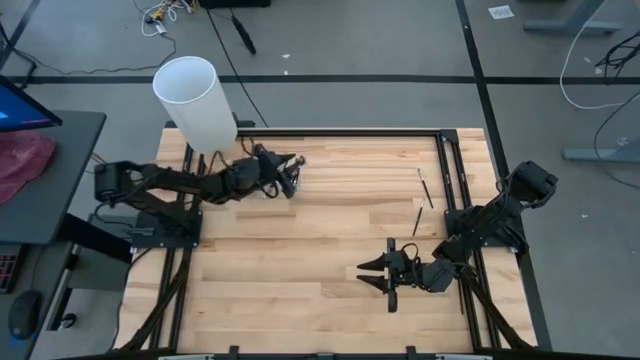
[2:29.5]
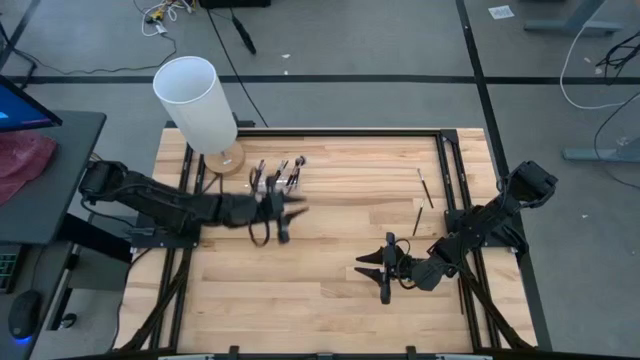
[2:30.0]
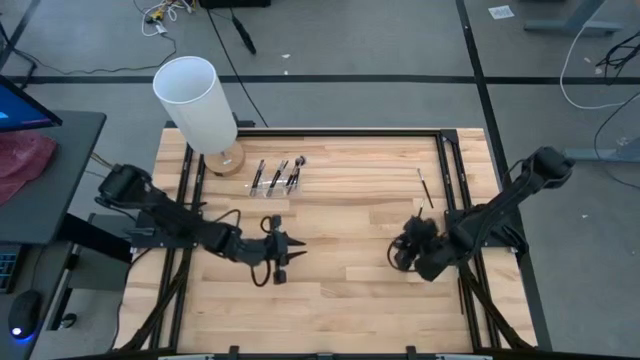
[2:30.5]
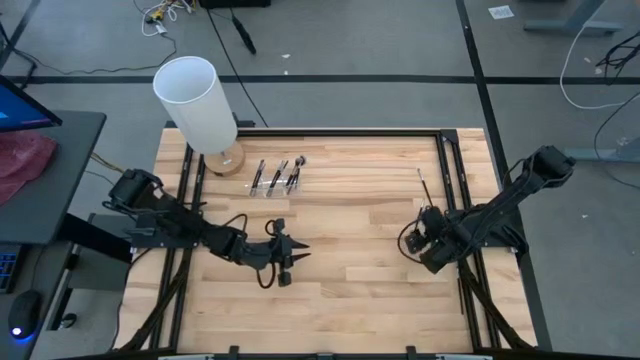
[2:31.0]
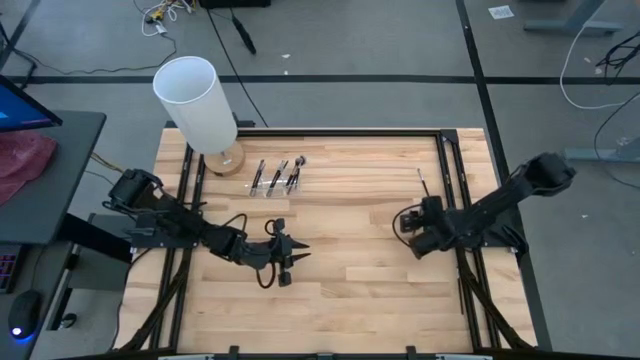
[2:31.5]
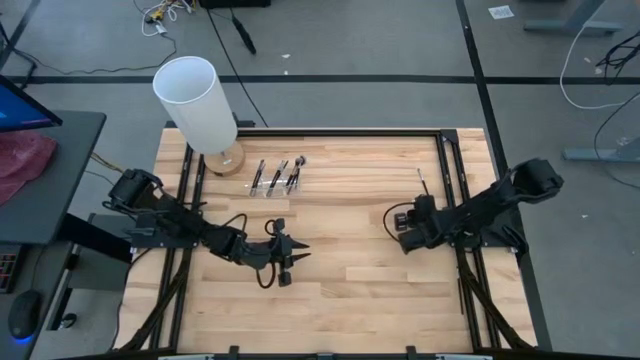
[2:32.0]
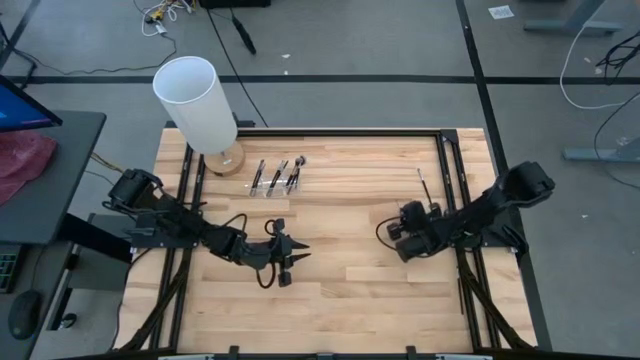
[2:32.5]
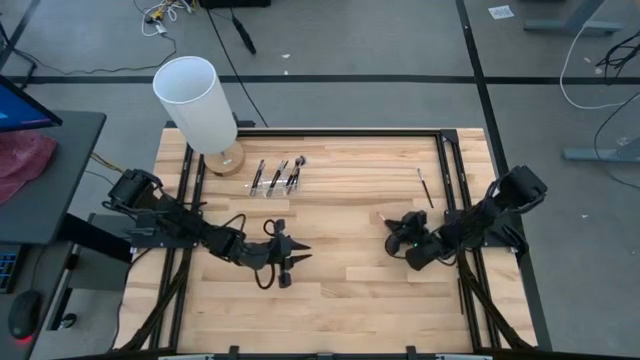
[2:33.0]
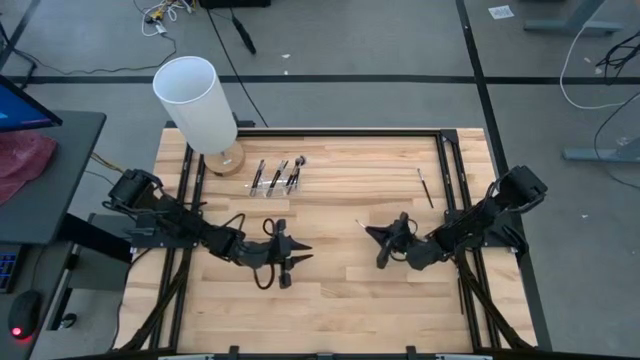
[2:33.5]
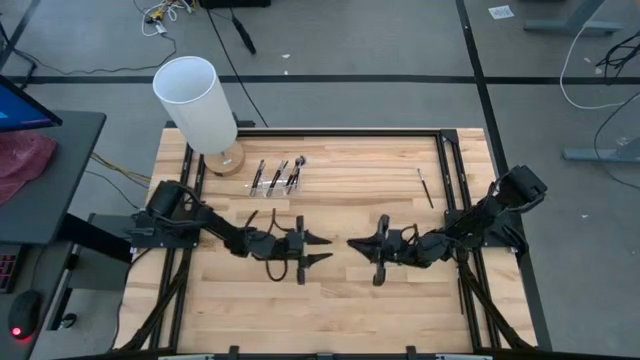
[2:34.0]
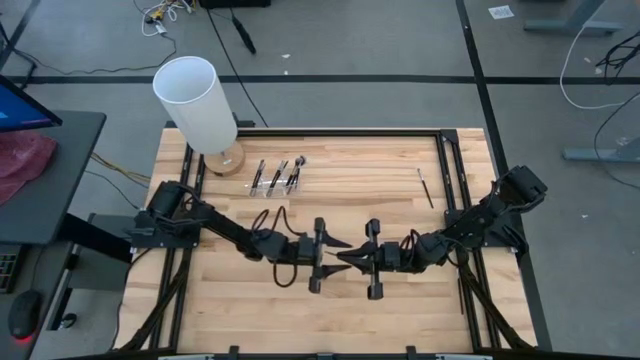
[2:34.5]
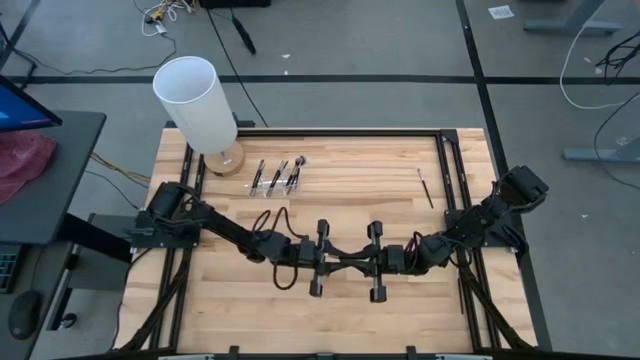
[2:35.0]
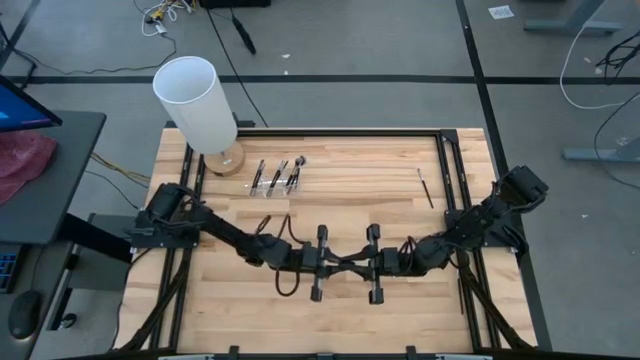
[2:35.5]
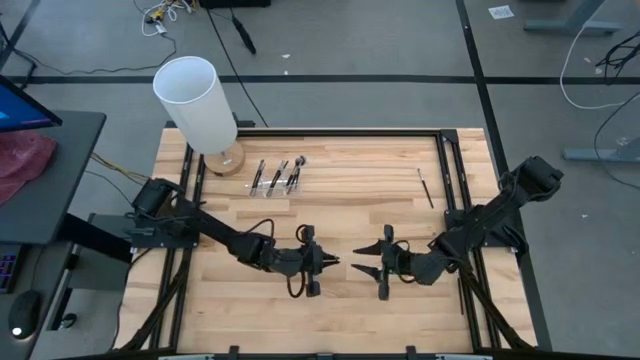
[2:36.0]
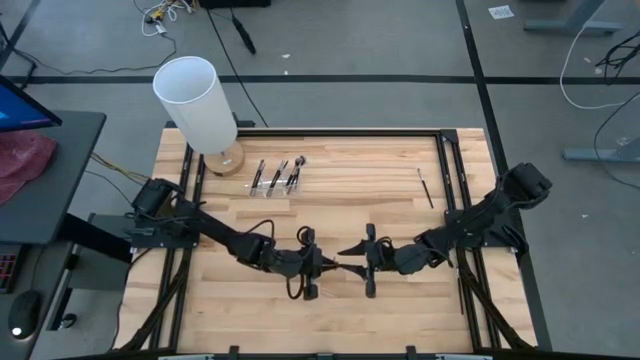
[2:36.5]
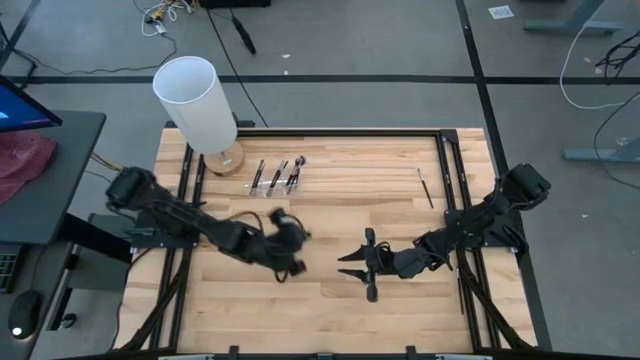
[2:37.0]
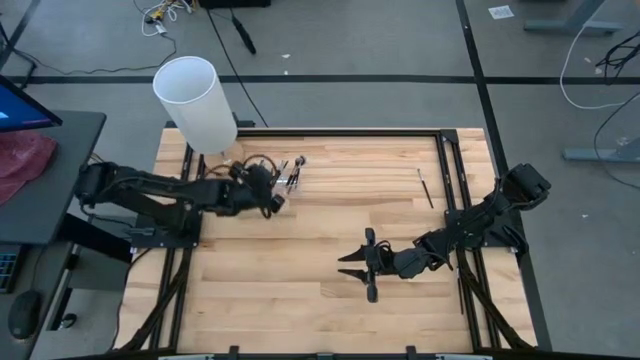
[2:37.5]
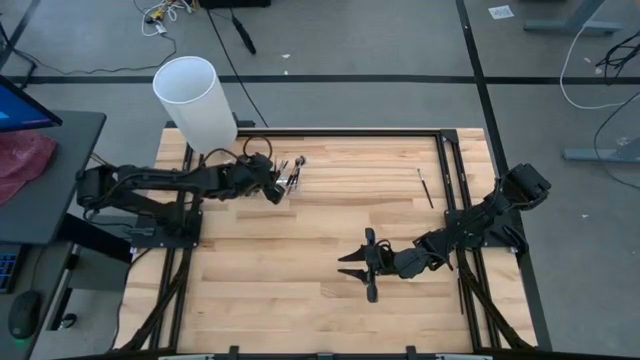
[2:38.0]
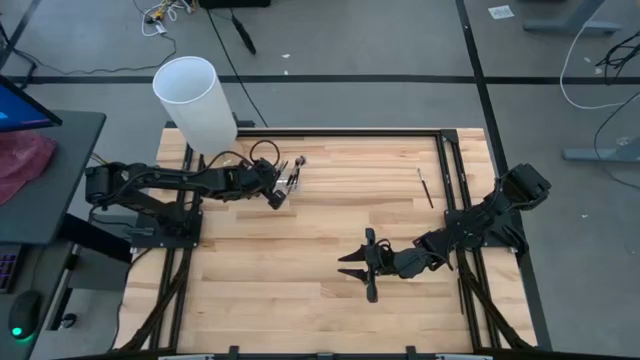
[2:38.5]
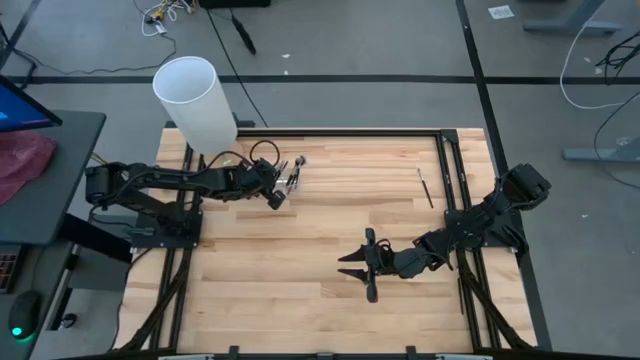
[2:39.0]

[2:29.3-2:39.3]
Task: Put items in baskets/containers
Put the eyeshadow brush into the transparent organizer

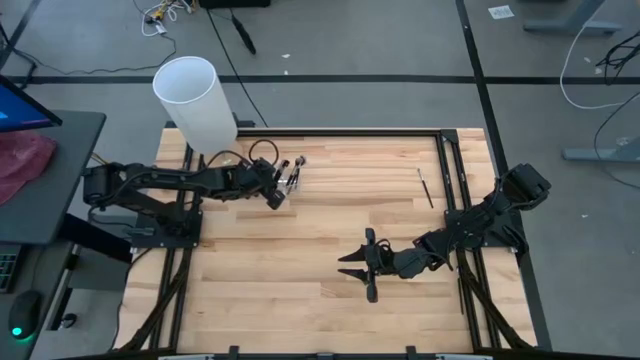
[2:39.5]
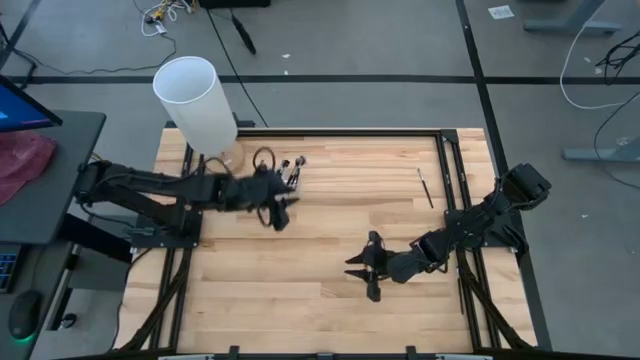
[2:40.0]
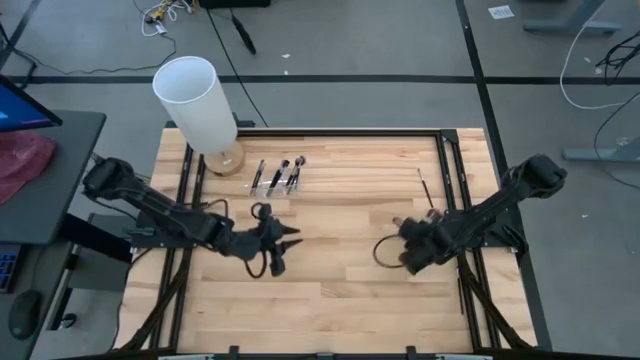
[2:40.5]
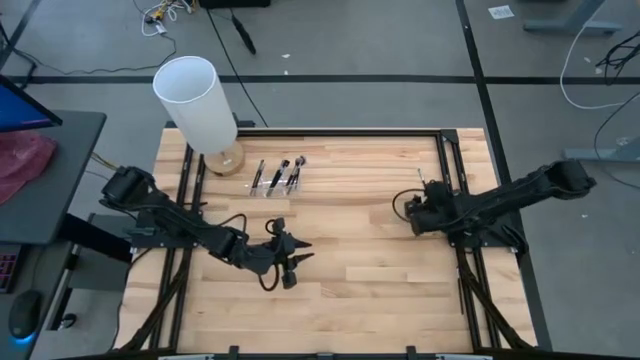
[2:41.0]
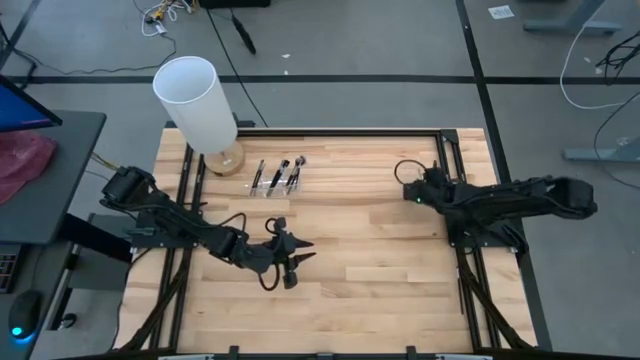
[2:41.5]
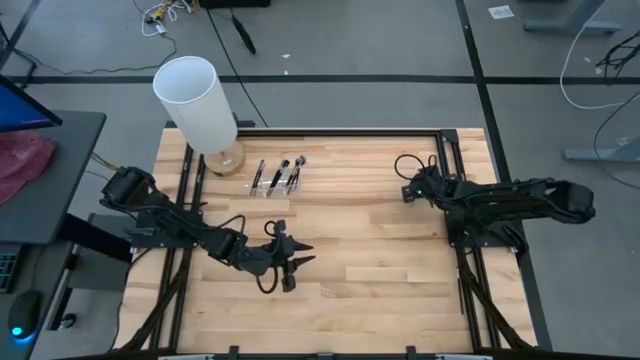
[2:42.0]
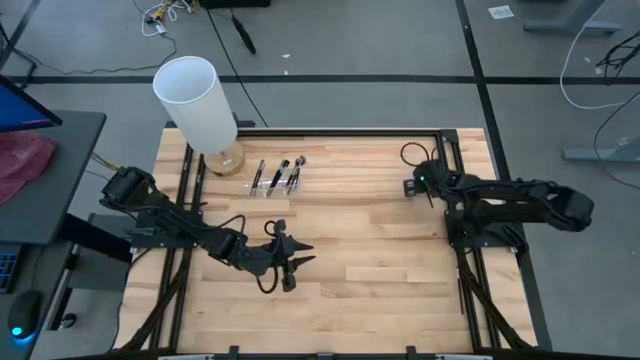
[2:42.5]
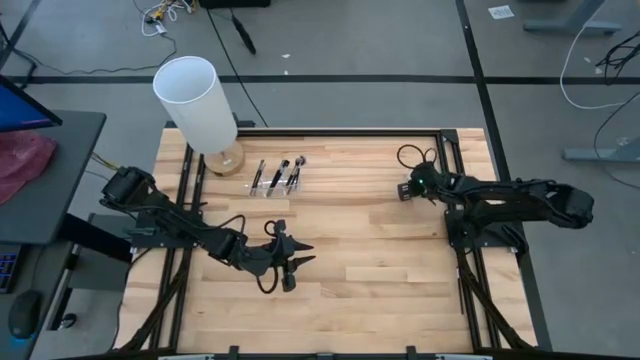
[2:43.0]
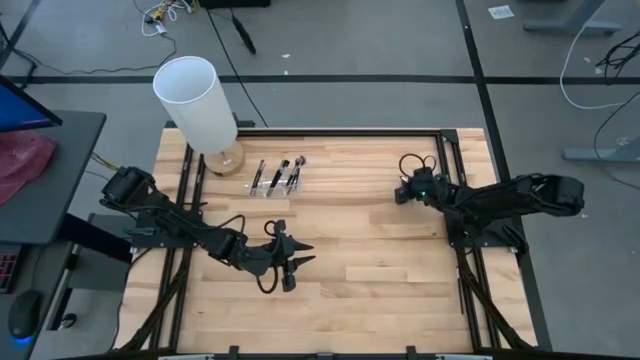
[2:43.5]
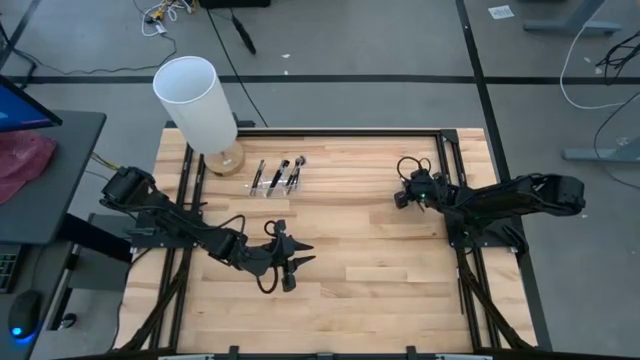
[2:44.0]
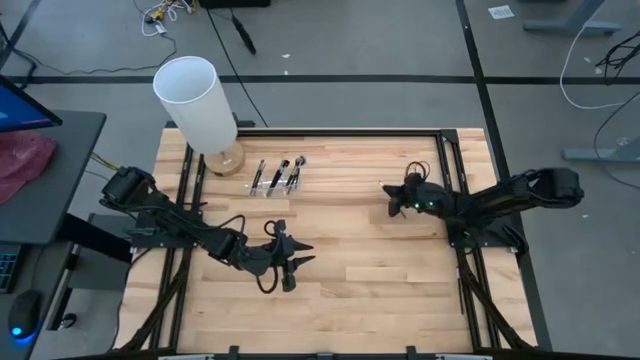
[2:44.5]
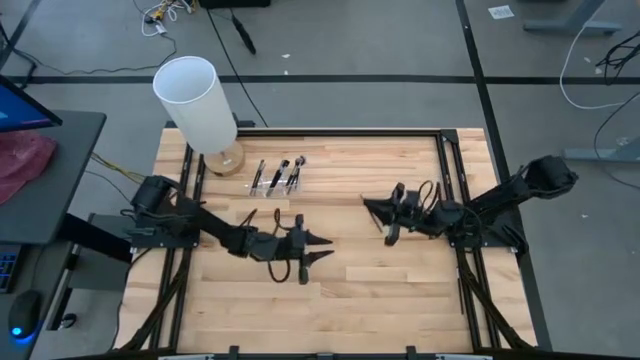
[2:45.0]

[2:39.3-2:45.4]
Put the eyeshadow brush into the transparent organizer

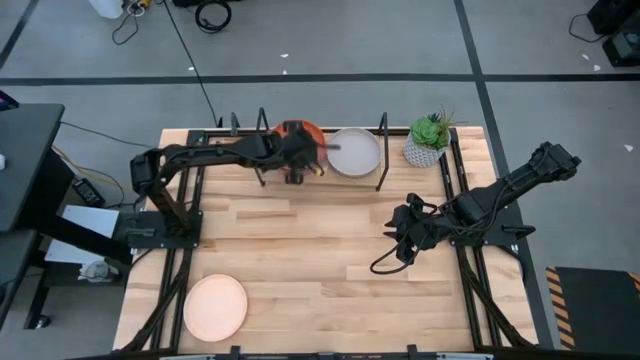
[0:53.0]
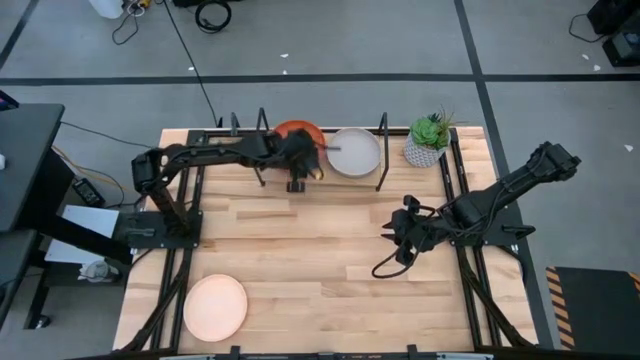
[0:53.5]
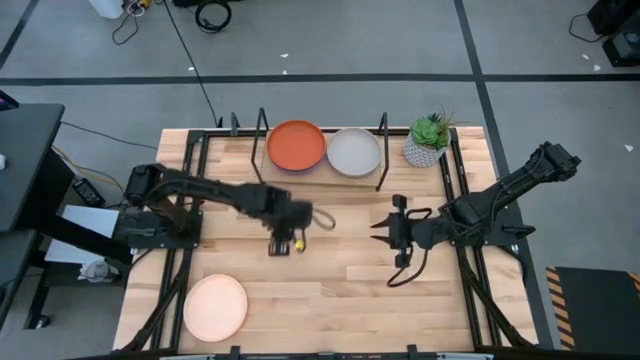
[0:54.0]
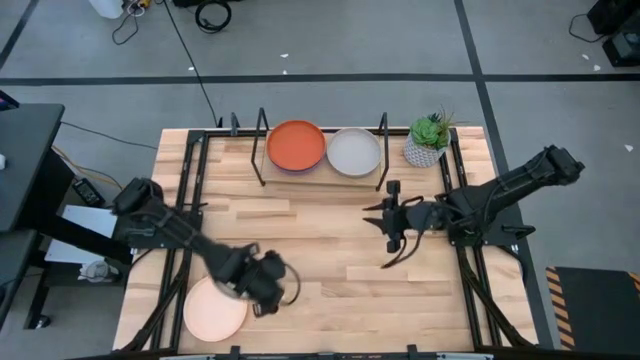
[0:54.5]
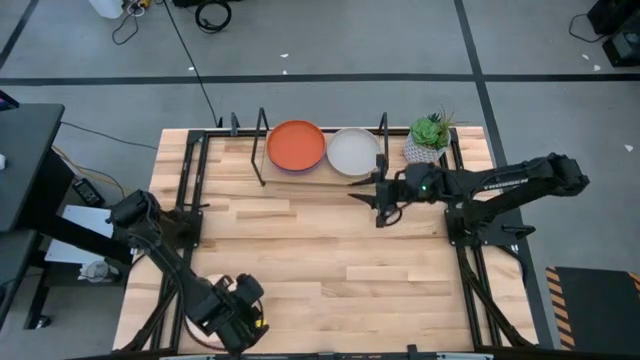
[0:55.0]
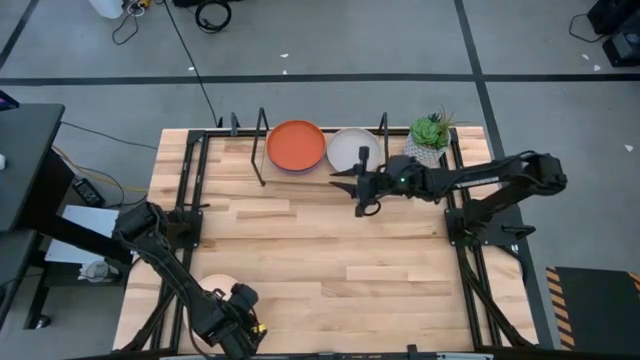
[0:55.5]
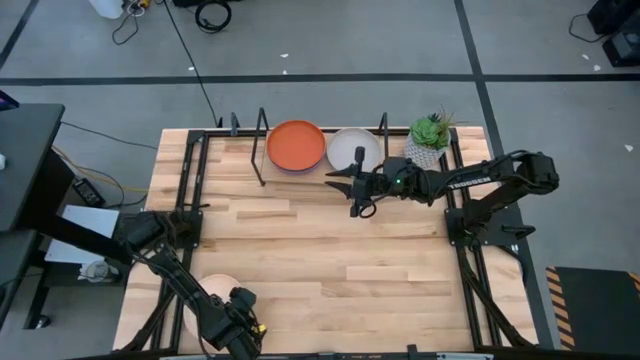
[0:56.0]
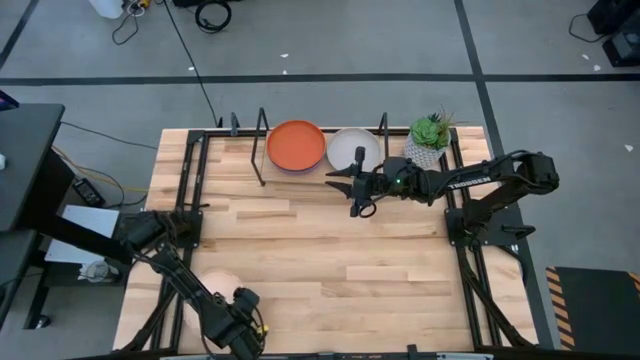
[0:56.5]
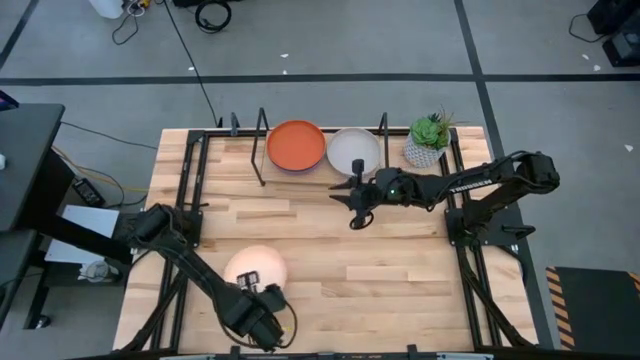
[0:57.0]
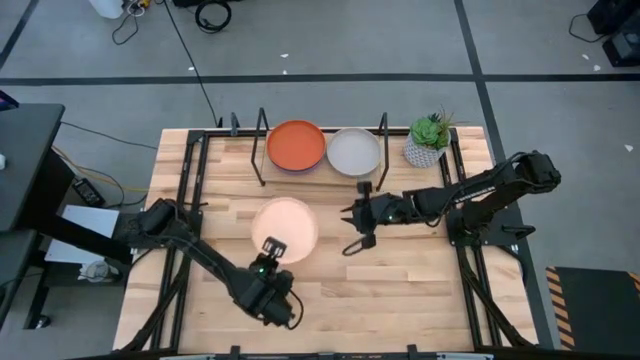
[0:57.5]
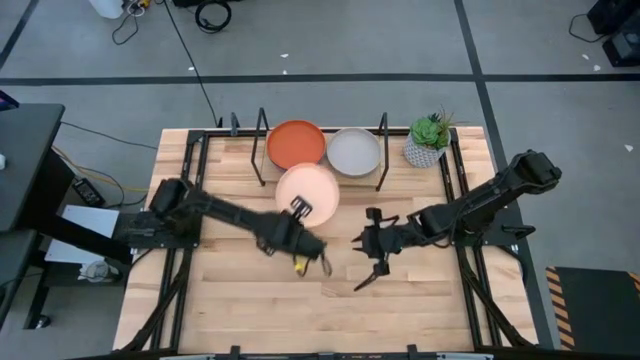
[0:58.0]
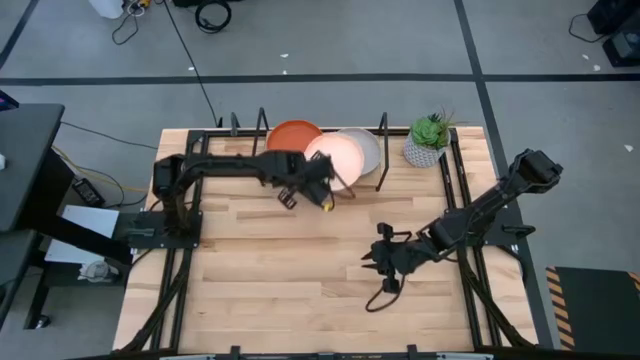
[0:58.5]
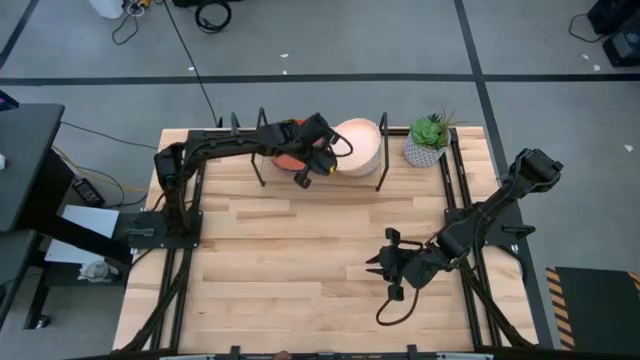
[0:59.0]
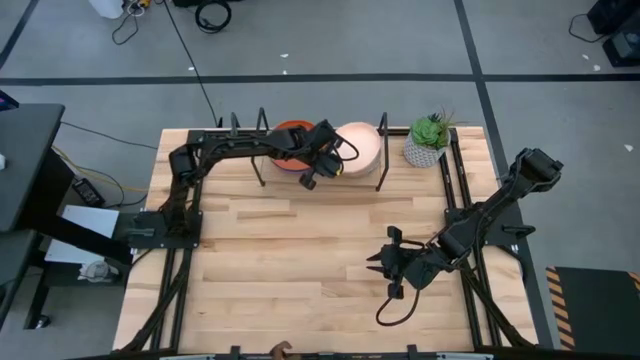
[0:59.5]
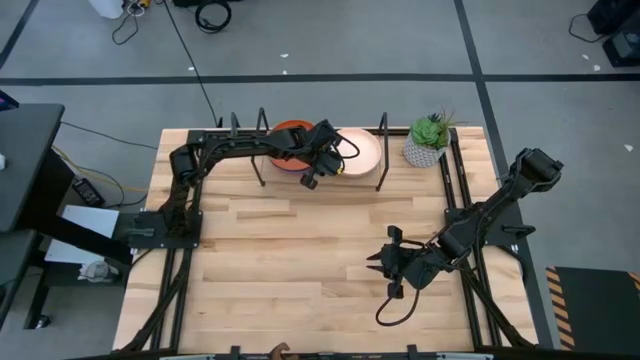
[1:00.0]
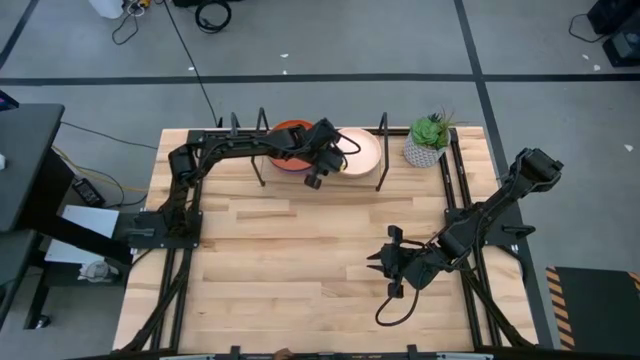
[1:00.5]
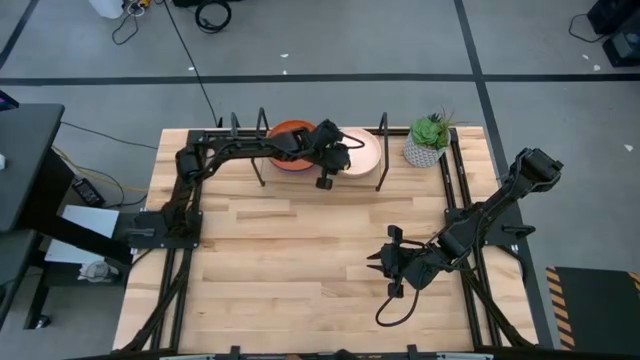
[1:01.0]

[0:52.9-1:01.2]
Task: Place and stack plates onto a shelf
Stack the light orange plate on top of the gray plate on the shelf
